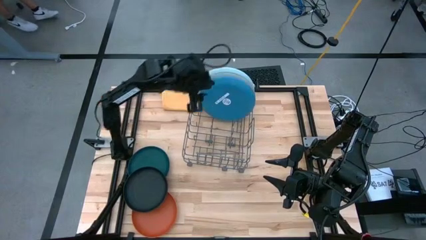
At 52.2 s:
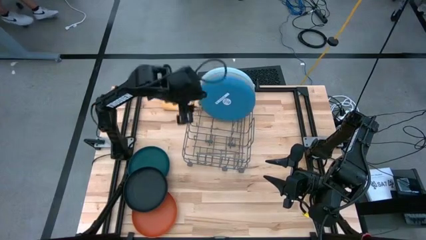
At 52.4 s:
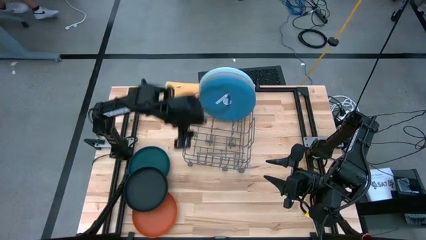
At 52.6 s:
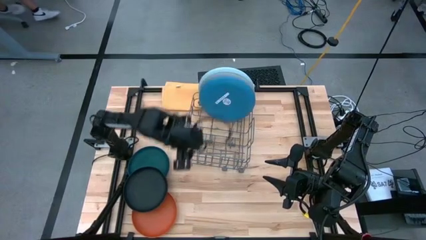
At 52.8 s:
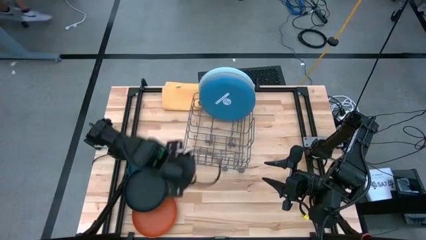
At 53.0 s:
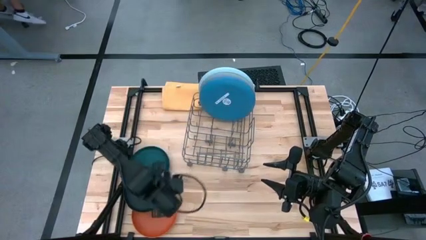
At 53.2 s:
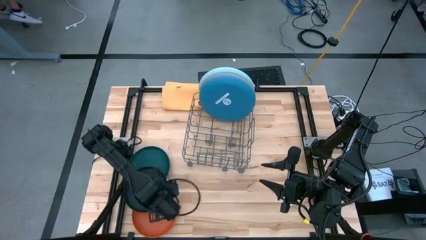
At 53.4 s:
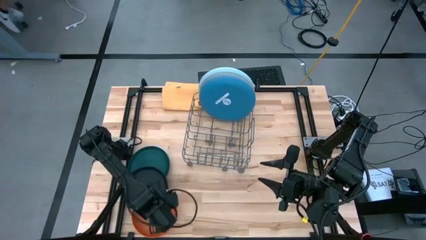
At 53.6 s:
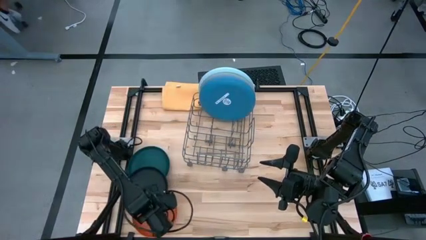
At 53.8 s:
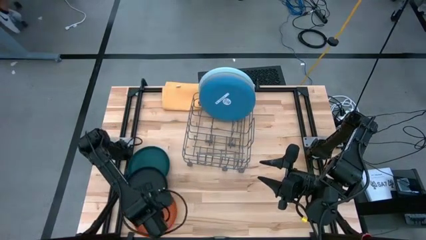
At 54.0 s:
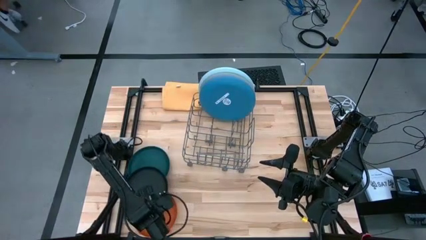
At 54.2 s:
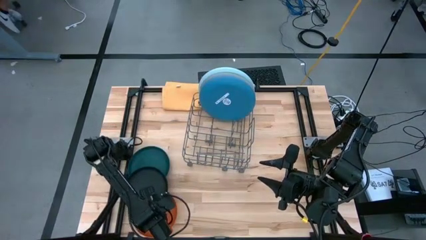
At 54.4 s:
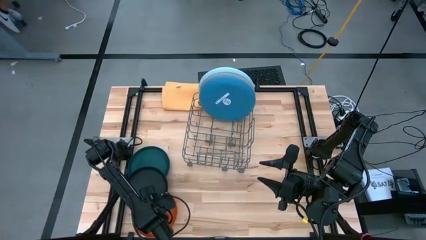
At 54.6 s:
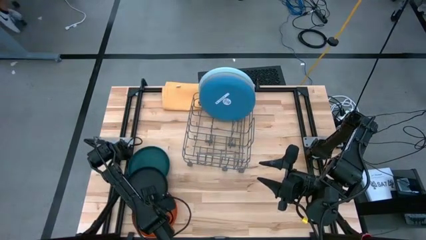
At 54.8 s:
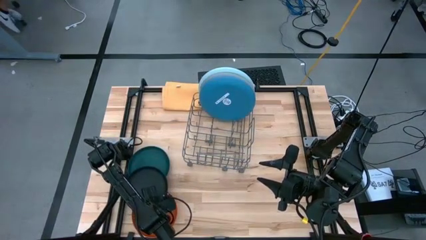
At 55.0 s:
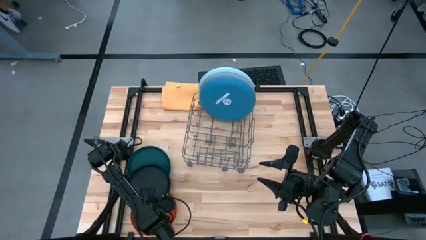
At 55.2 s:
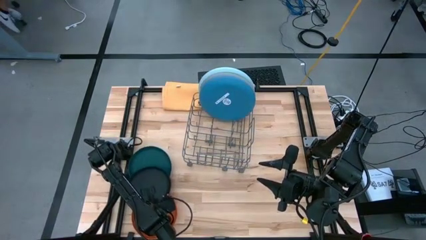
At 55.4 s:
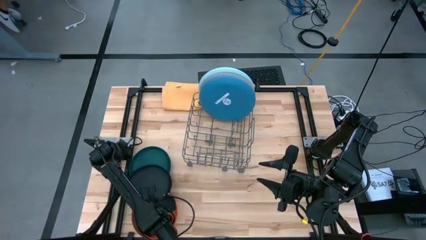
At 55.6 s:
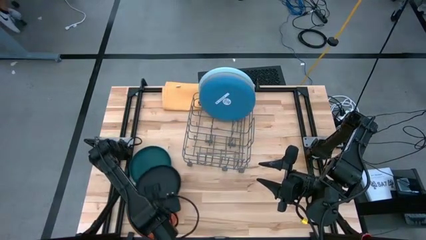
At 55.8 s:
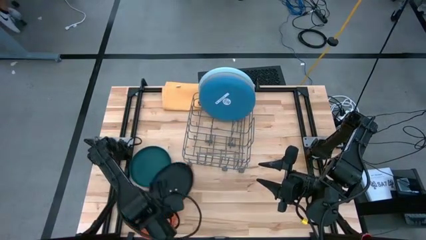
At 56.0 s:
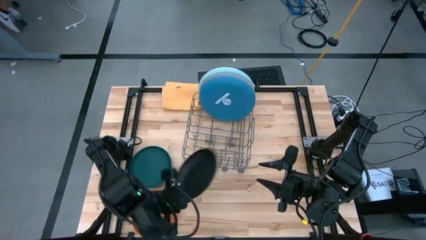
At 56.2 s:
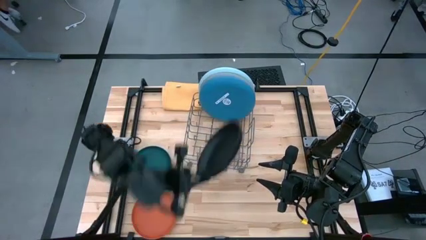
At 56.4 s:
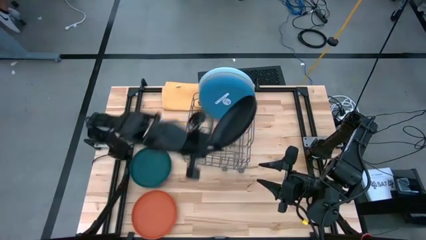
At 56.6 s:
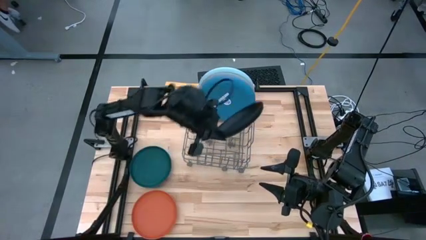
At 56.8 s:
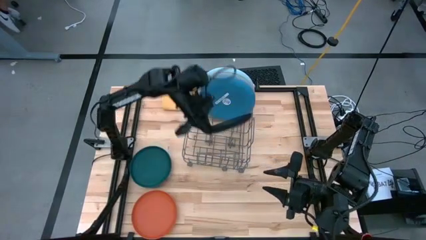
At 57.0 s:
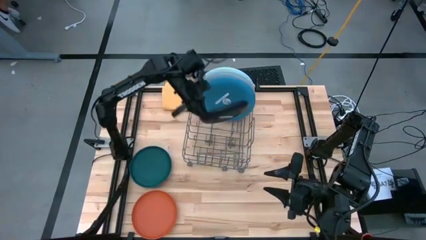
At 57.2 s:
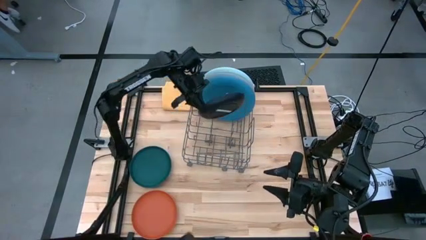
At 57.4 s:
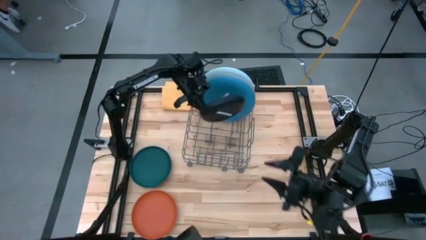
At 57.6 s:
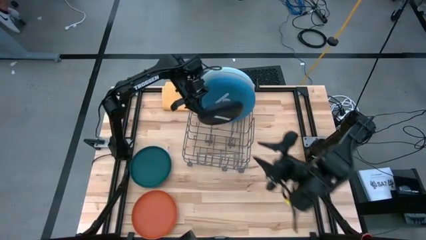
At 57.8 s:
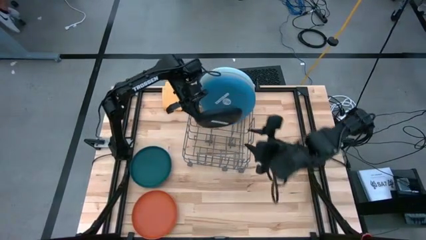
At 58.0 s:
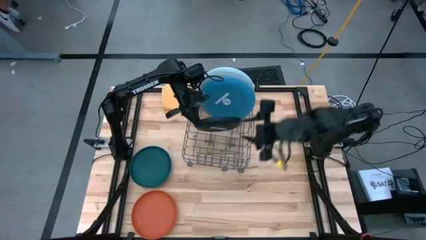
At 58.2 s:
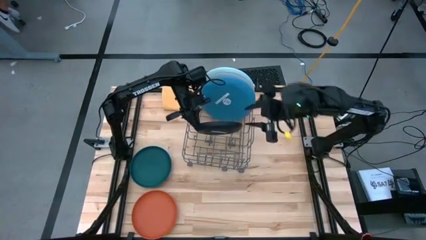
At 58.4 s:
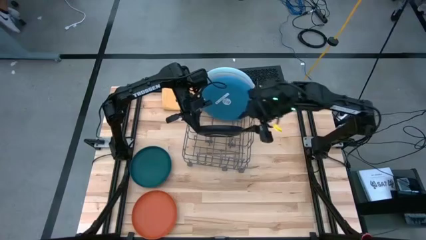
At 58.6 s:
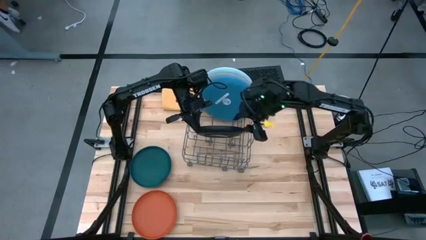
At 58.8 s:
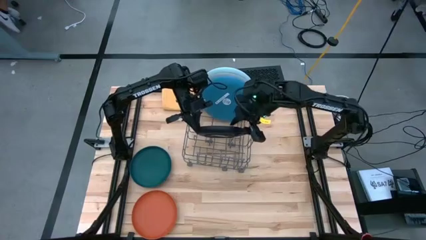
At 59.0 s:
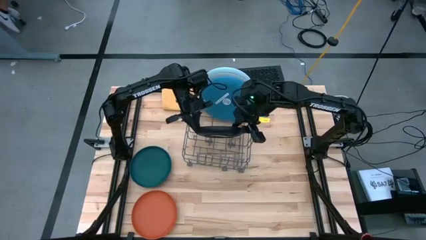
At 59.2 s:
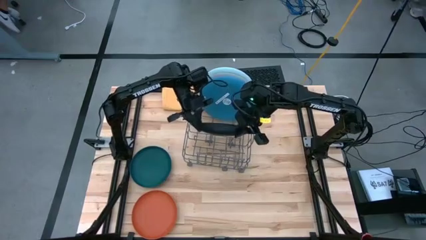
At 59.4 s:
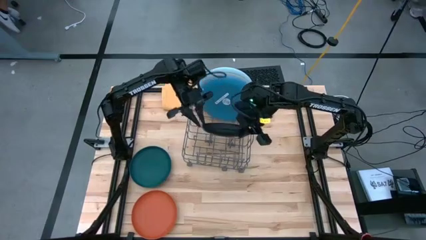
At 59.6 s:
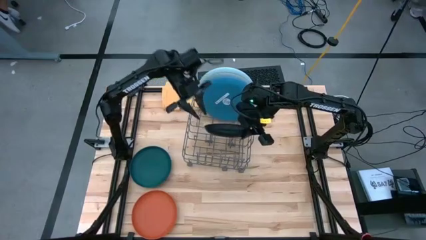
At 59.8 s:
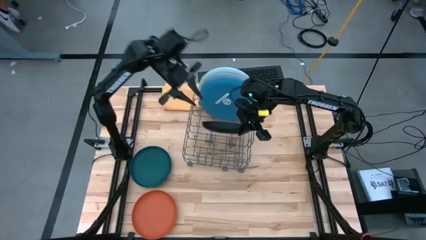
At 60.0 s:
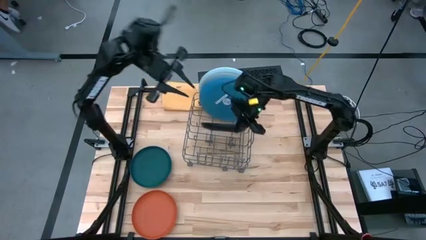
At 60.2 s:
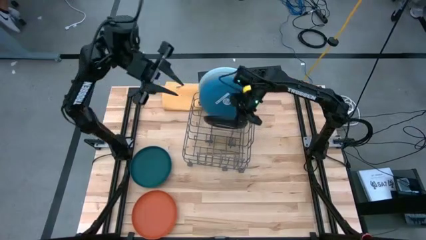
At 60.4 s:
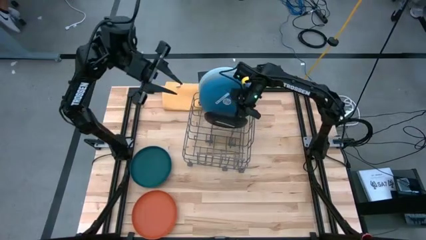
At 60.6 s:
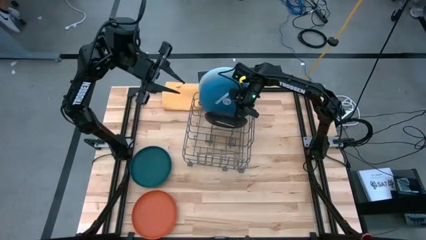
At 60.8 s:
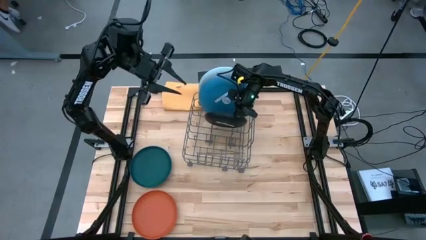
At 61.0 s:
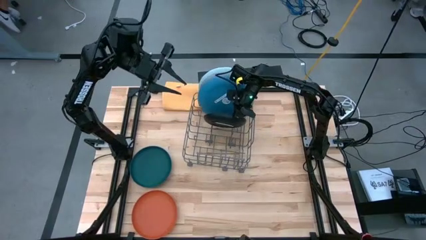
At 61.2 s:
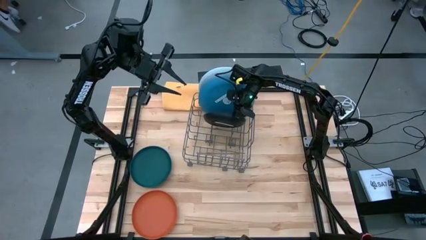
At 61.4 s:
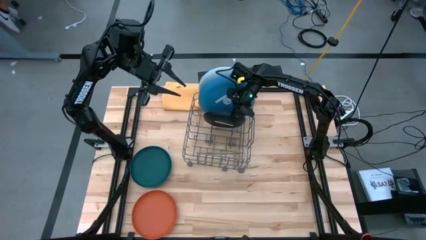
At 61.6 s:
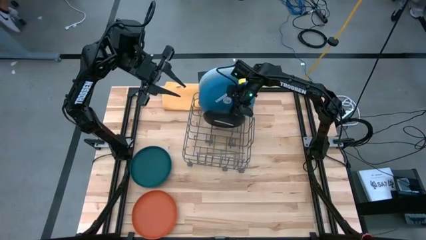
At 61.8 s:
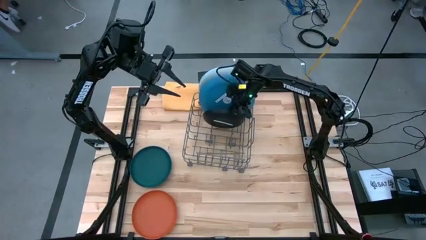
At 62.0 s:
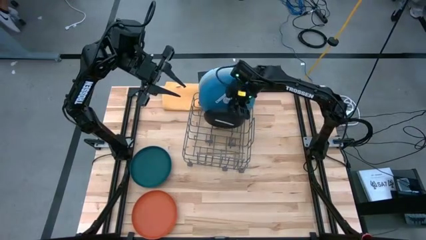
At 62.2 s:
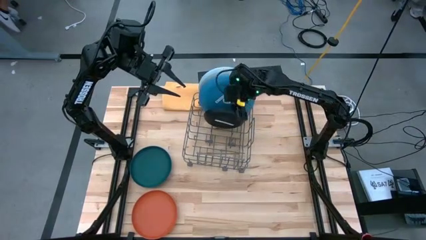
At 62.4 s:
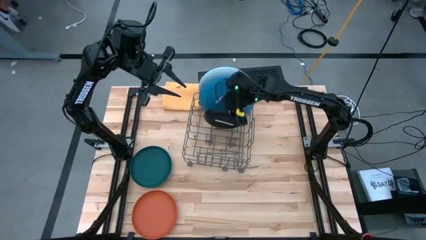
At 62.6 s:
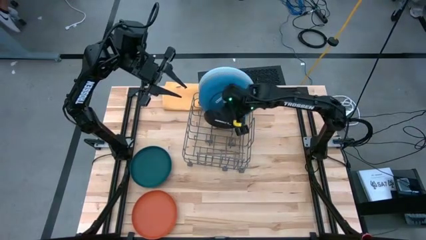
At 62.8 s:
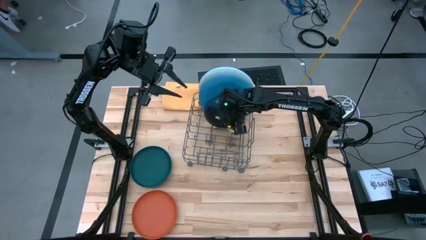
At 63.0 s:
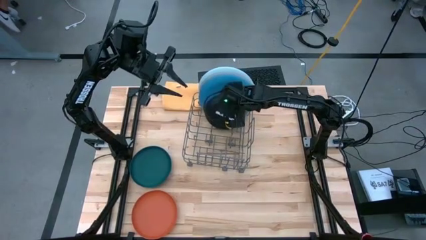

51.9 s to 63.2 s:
Task: Sort dishes
Put the black plate into the dish rack

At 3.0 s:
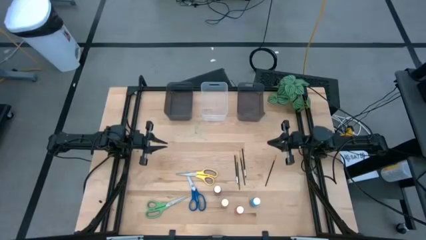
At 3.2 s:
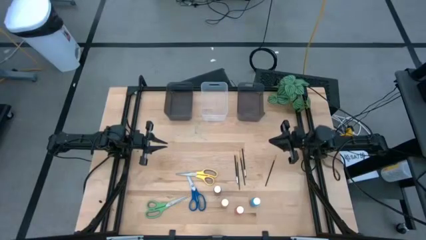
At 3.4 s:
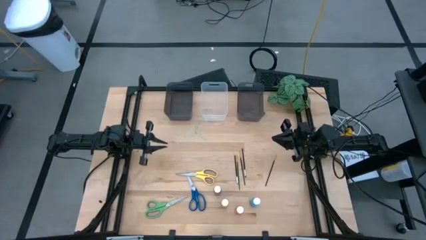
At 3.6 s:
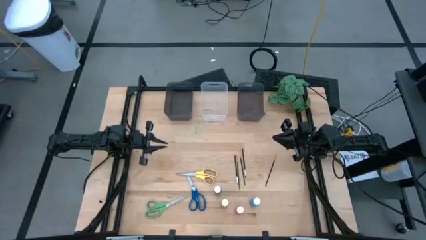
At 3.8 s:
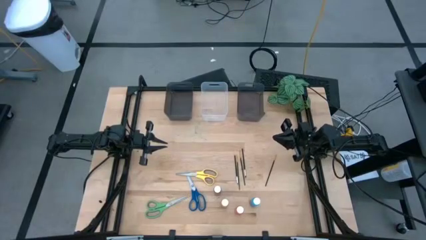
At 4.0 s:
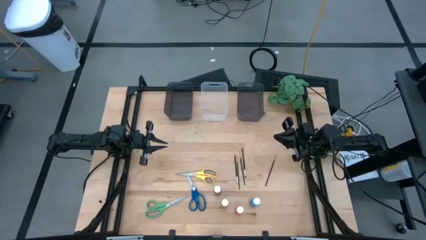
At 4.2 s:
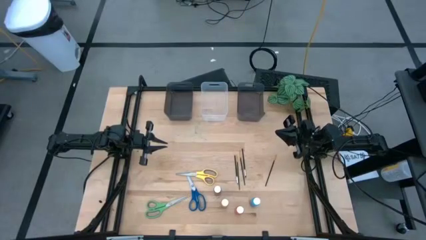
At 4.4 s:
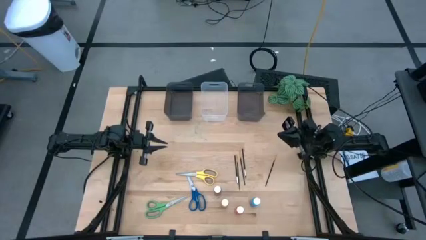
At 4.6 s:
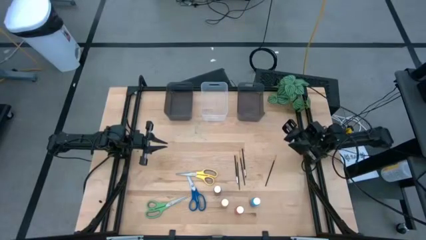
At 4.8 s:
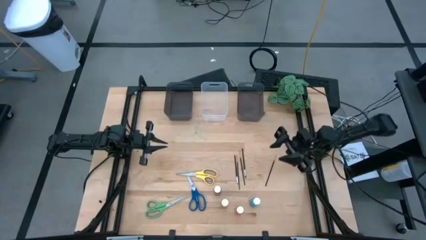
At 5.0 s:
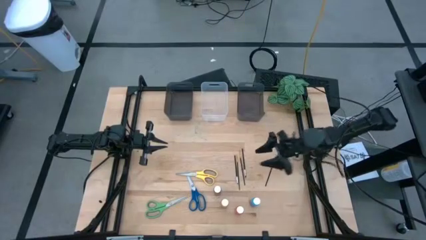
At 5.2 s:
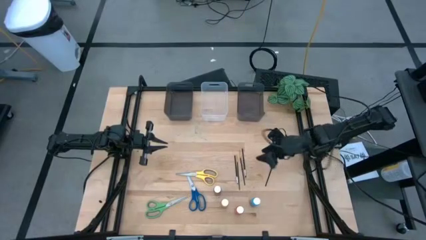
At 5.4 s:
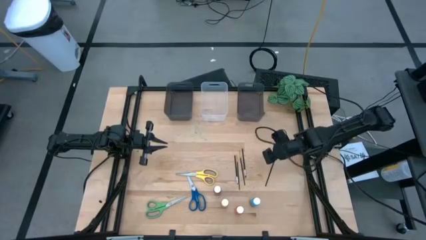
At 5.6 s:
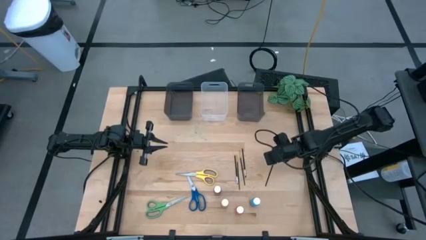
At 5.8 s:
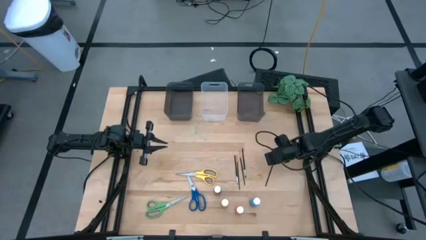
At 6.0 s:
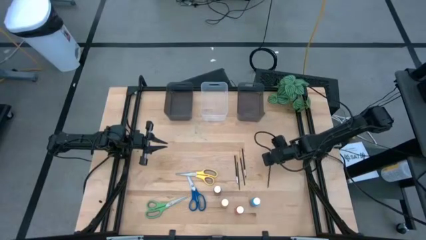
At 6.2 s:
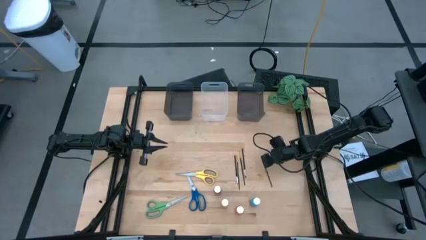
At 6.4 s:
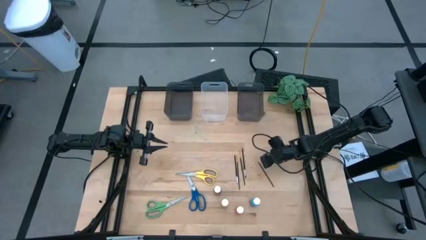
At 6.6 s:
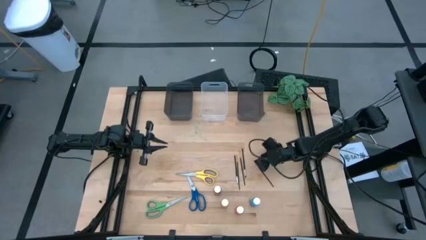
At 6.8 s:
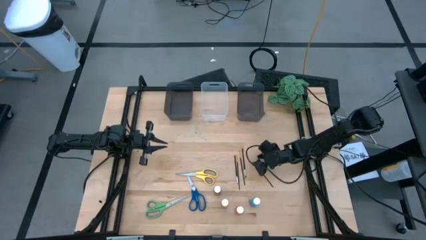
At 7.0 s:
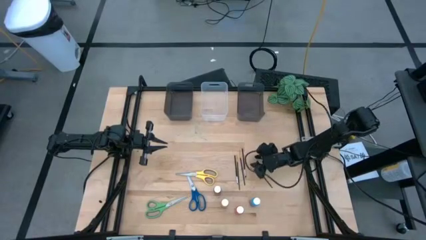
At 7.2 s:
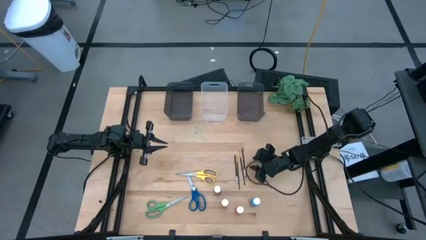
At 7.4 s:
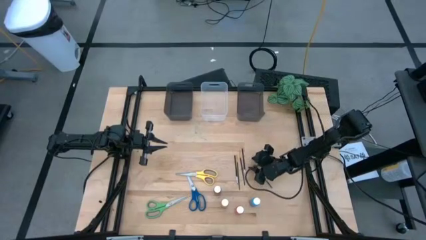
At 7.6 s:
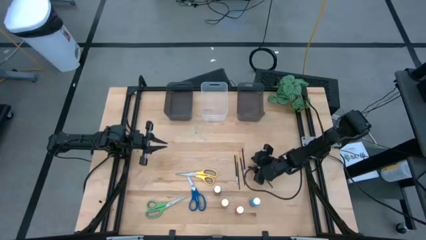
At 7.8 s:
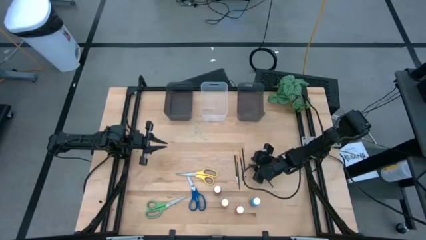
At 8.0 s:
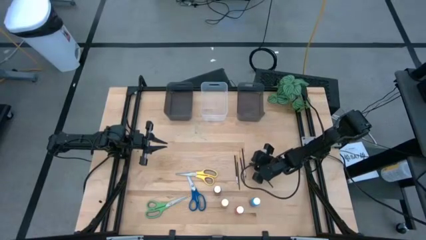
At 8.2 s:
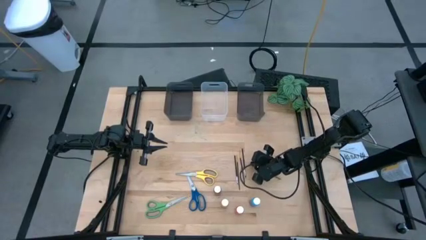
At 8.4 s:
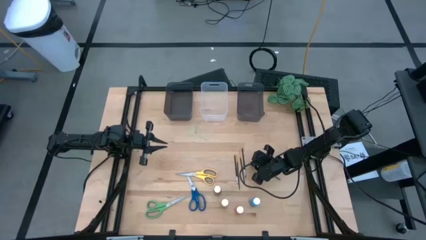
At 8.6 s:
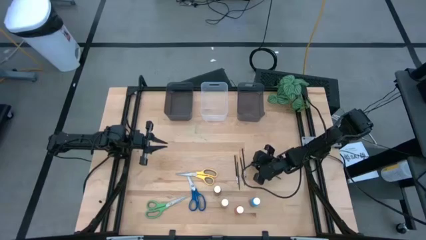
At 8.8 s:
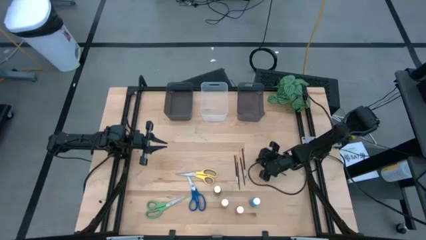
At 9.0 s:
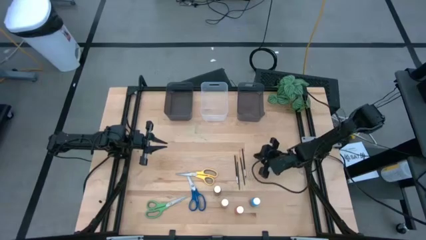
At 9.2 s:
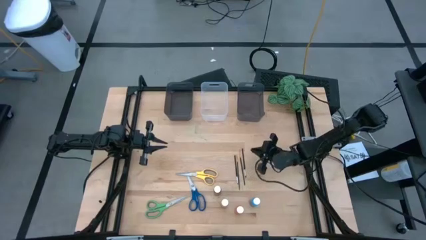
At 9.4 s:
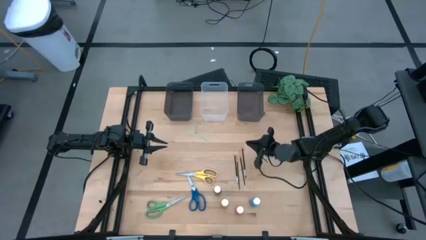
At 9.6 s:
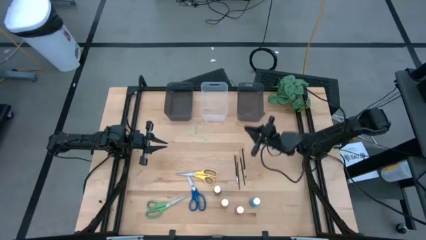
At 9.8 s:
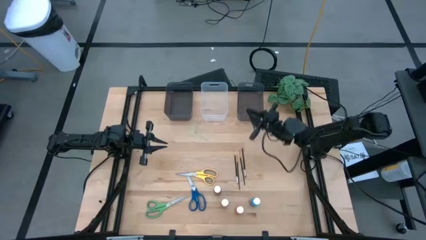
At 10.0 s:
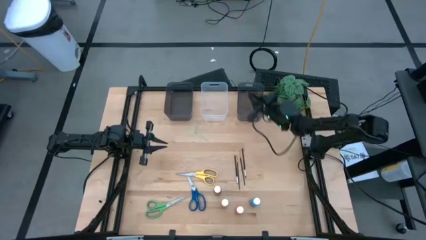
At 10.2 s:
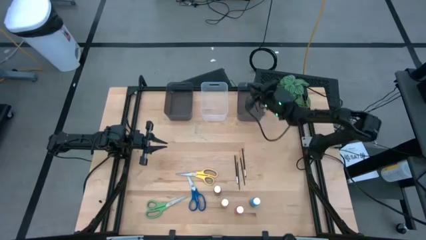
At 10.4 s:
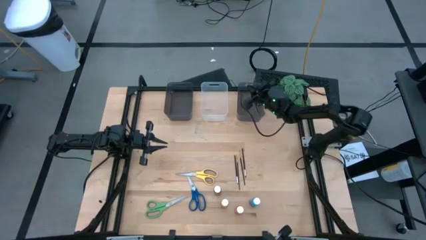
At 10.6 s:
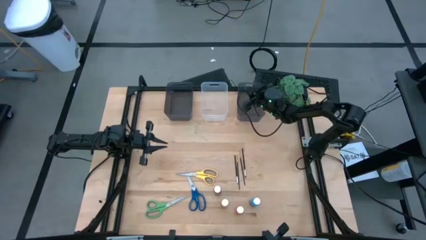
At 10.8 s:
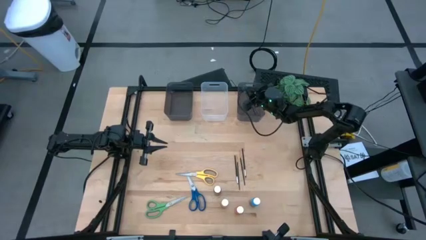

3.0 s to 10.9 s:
Task: Pick & Place Paint Supplies
Put the black paintbrush into the right black bin
